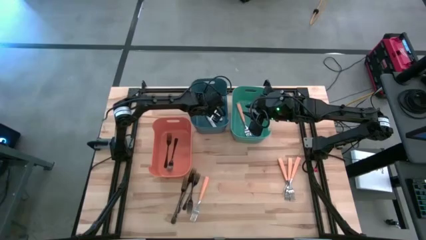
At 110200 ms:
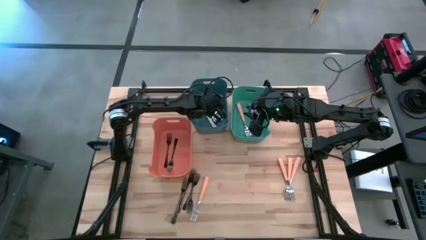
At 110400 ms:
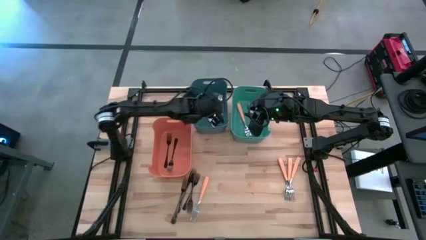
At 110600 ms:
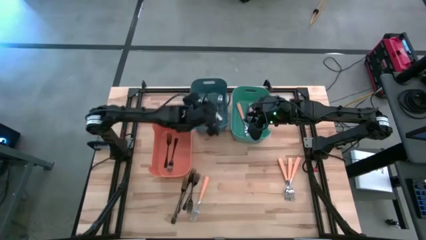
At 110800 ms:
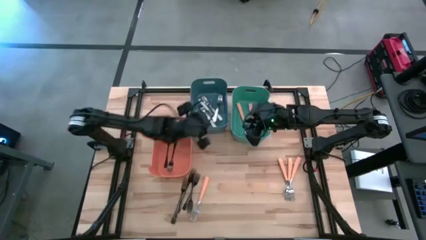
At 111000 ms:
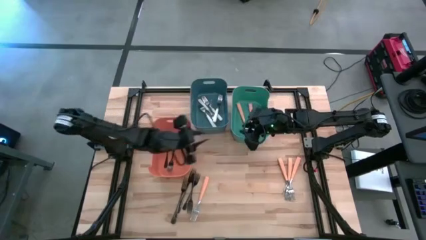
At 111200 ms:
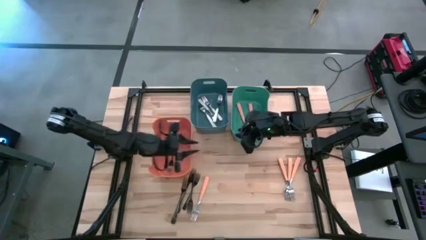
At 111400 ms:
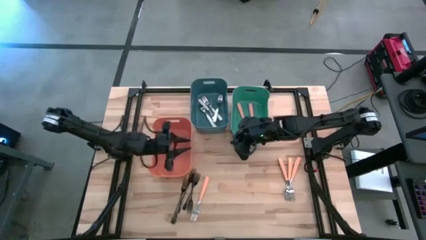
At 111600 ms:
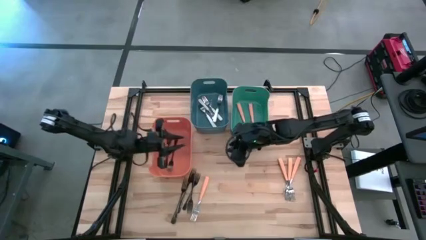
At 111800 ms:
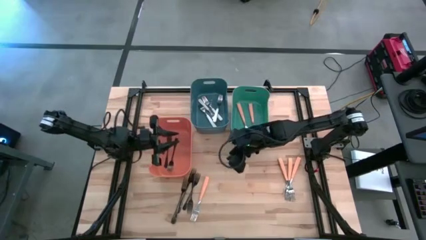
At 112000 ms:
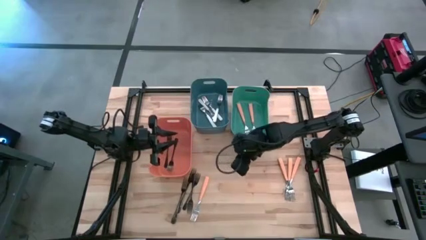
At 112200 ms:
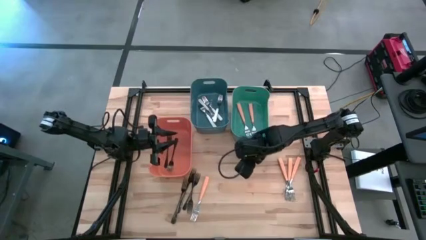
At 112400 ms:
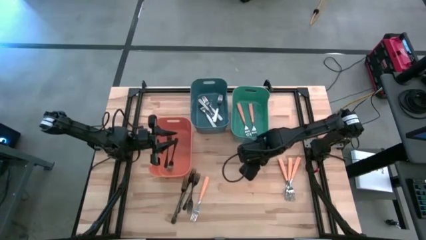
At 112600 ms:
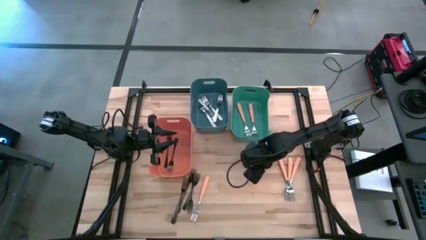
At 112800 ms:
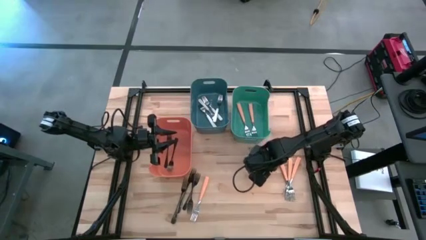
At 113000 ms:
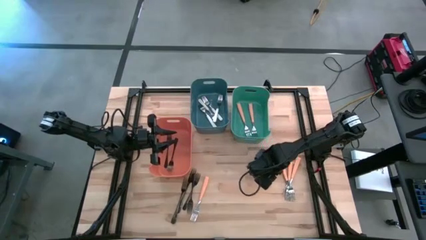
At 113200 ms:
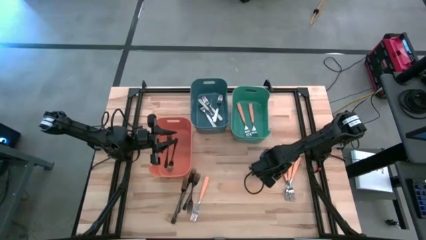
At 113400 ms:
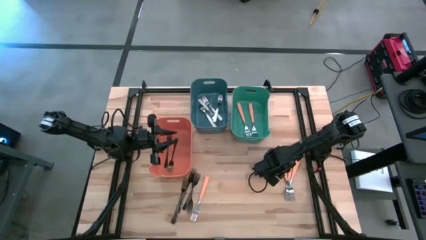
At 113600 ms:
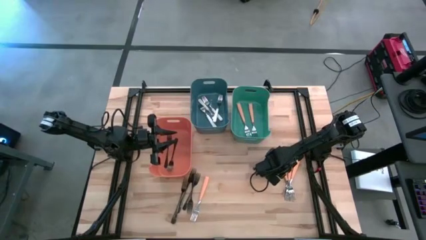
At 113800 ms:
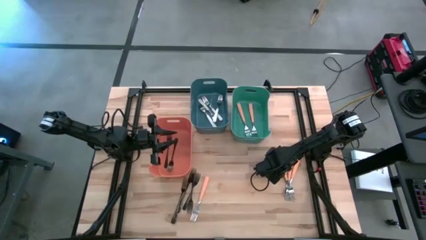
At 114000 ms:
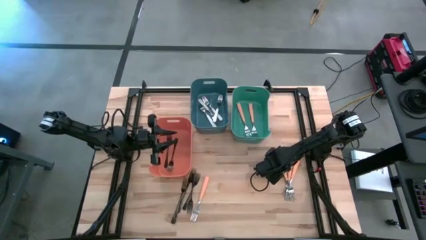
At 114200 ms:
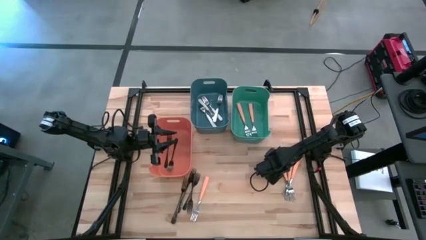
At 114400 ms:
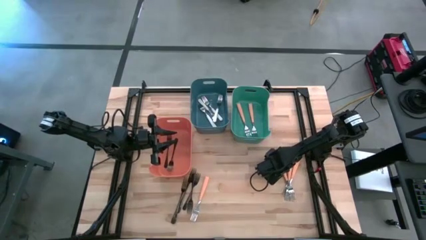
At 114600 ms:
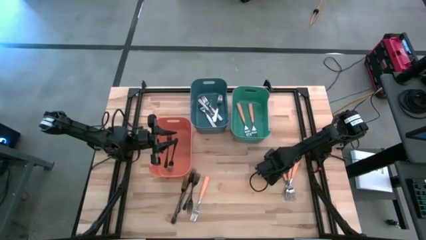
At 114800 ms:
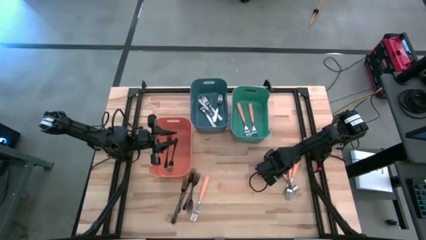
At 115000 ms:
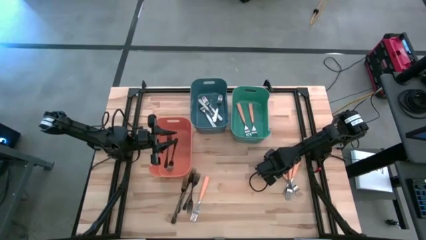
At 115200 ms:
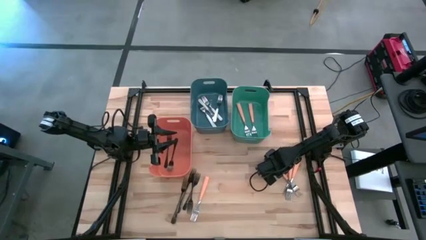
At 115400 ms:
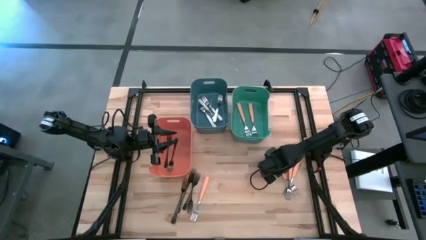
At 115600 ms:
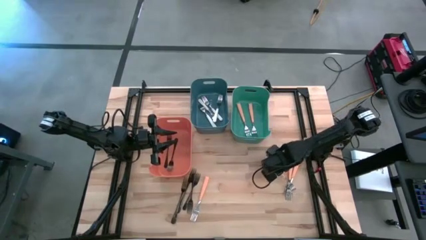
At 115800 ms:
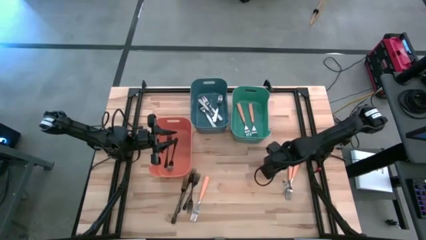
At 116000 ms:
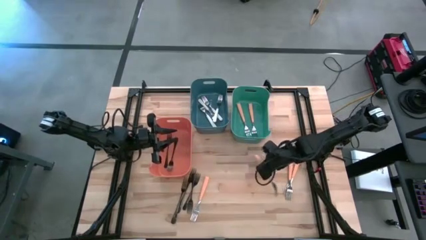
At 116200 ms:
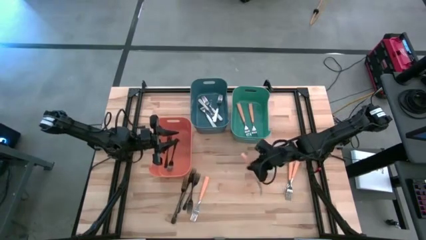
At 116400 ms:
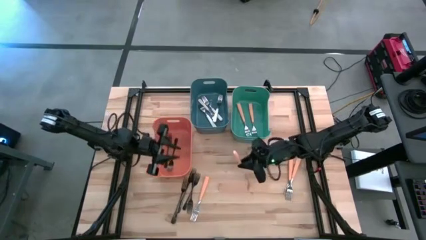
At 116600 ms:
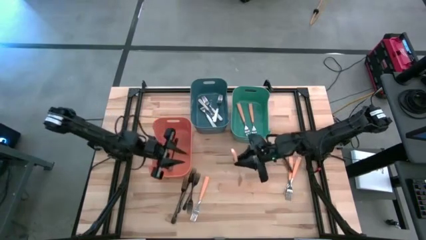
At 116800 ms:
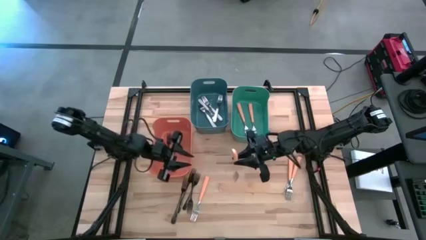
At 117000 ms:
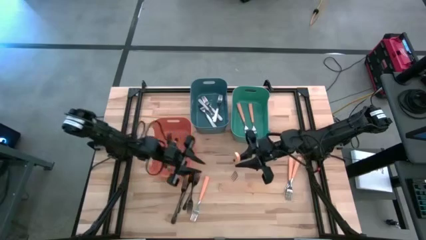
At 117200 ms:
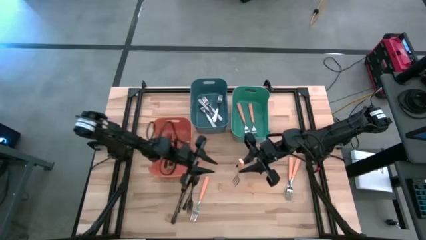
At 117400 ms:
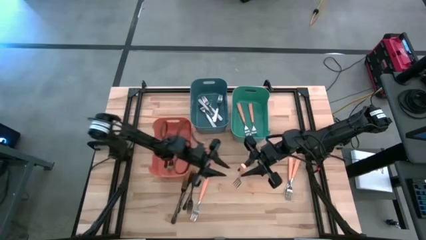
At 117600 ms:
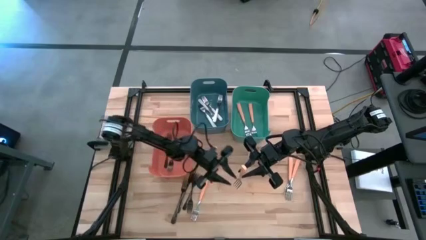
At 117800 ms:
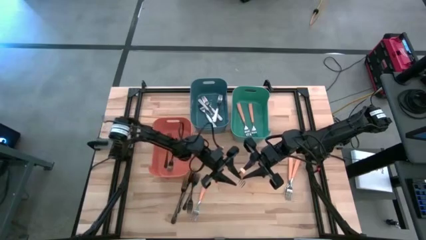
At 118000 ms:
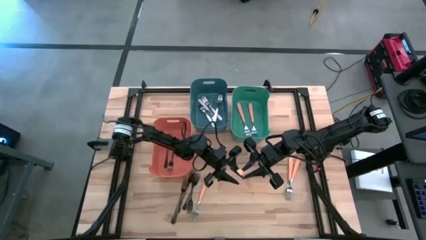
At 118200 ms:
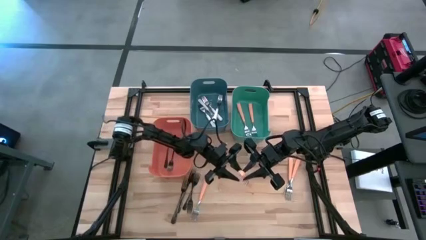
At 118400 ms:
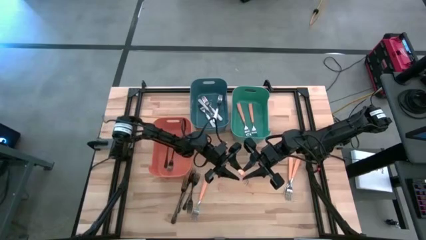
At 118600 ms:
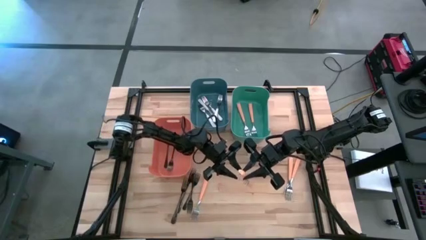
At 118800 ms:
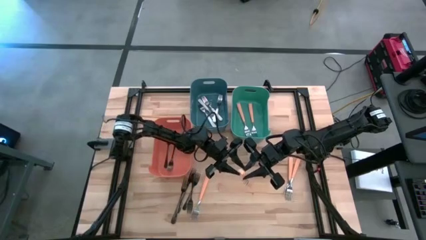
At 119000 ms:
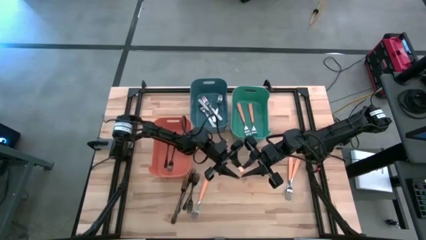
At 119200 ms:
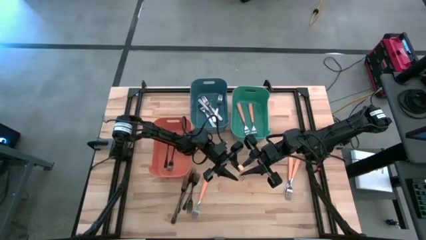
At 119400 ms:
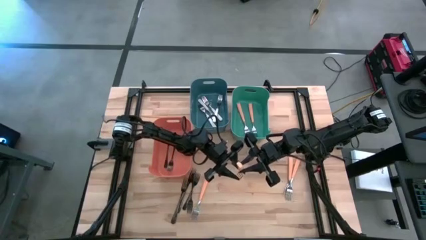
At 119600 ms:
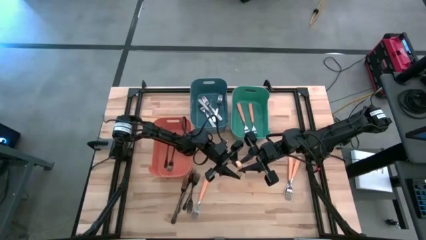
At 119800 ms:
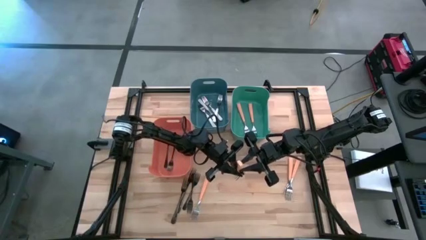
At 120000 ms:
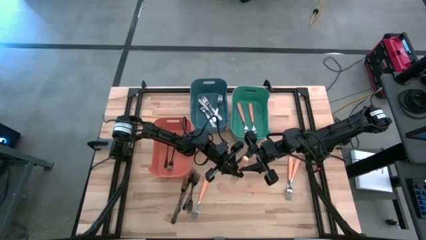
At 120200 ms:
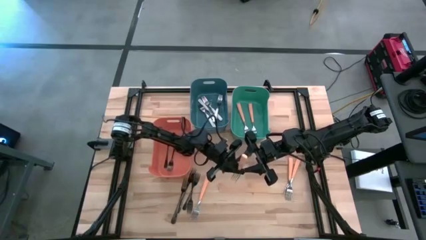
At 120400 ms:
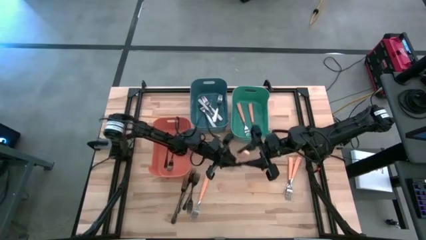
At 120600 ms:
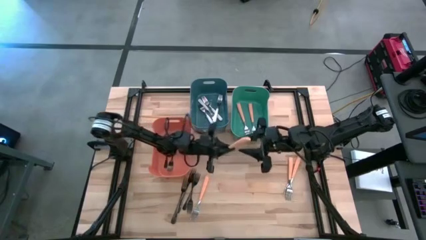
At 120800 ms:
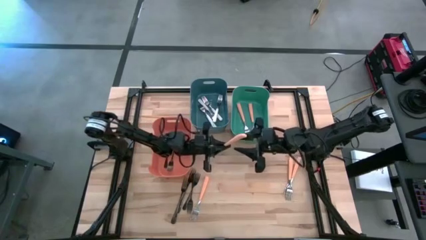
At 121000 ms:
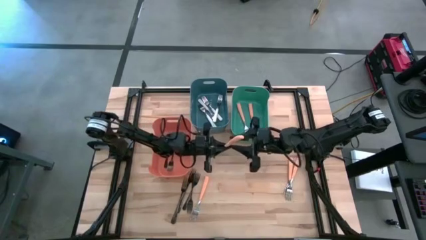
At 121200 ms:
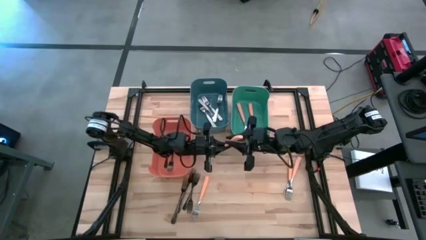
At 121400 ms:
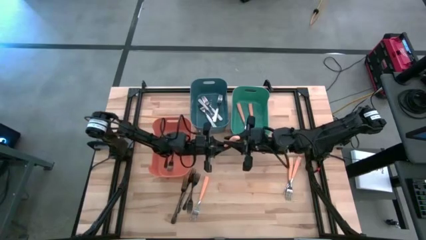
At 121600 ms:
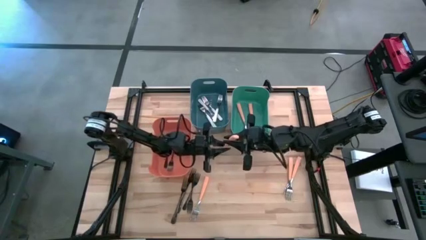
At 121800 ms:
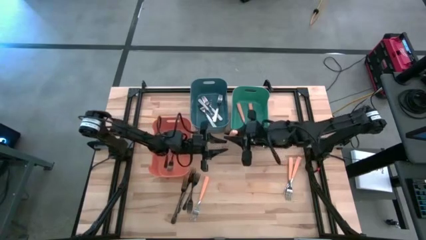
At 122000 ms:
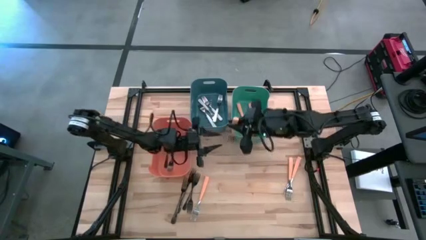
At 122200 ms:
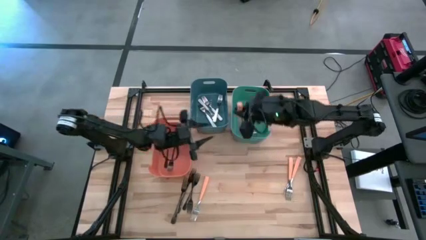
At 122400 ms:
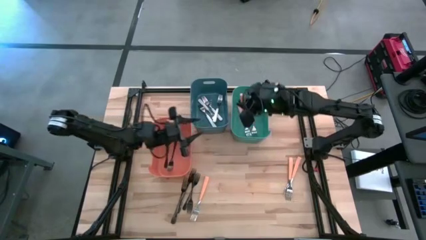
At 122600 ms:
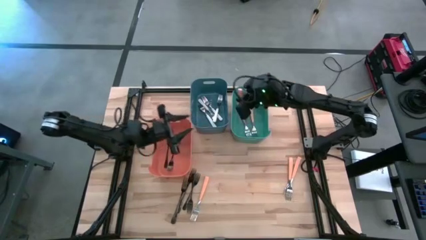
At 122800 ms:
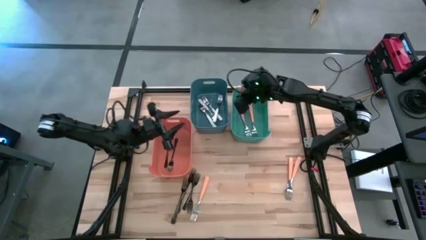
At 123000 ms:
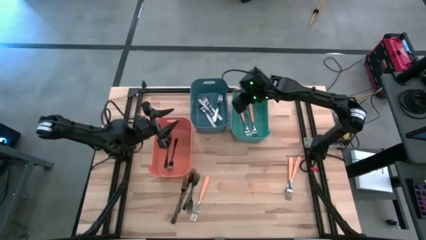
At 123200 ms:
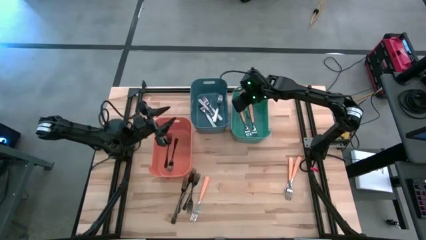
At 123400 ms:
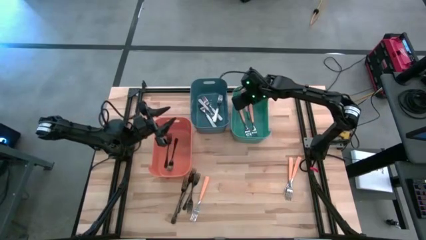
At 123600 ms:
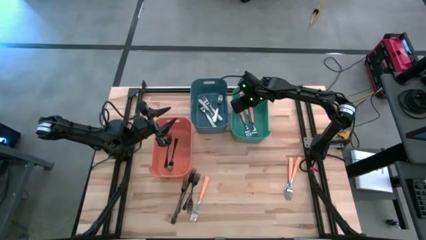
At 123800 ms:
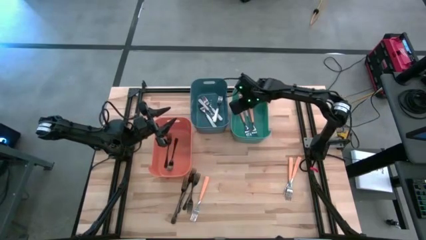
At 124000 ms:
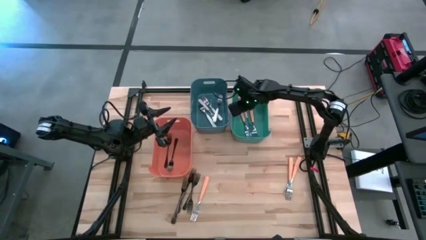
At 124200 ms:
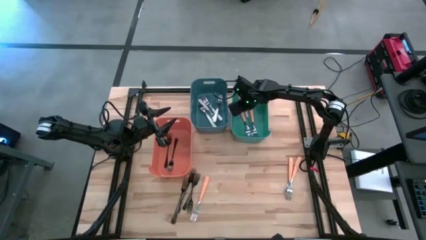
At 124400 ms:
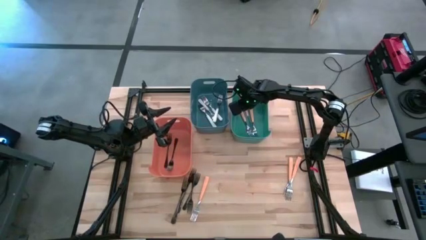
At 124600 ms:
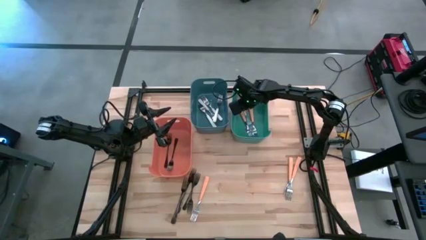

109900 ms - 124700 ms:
Task: Sort silverware by color (type)
Put the orange fork into the green bin
